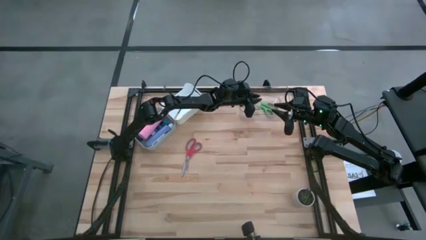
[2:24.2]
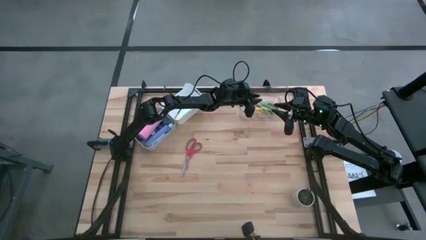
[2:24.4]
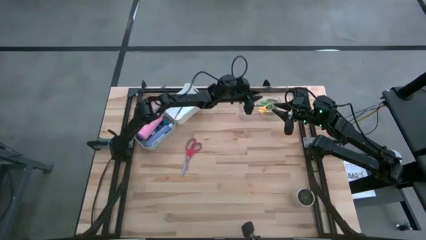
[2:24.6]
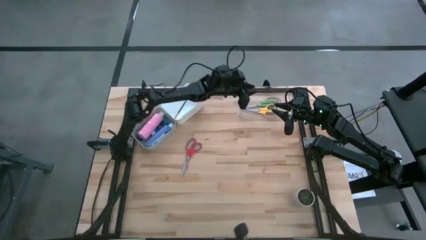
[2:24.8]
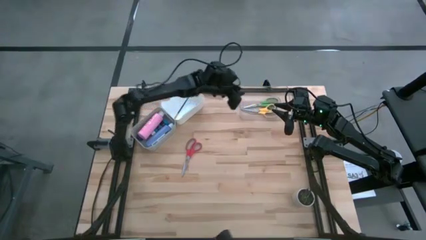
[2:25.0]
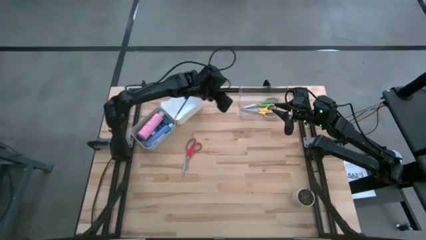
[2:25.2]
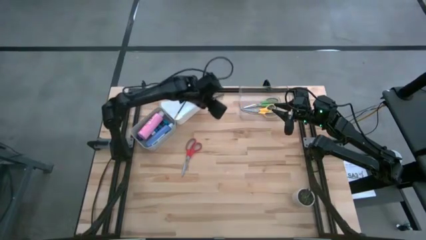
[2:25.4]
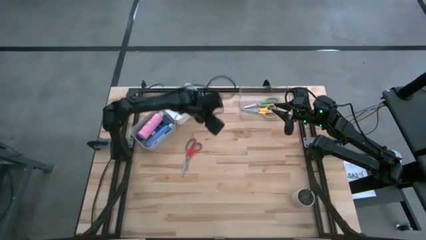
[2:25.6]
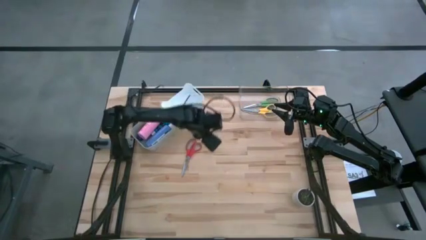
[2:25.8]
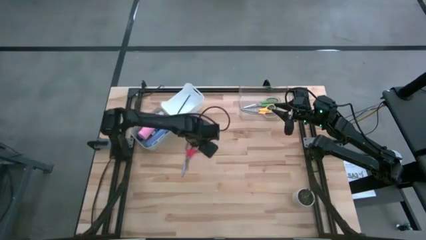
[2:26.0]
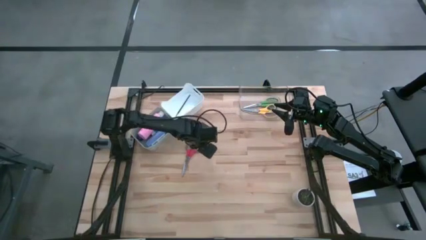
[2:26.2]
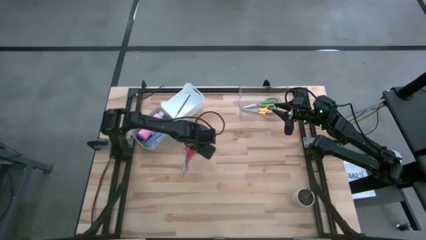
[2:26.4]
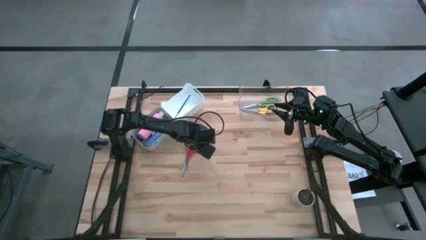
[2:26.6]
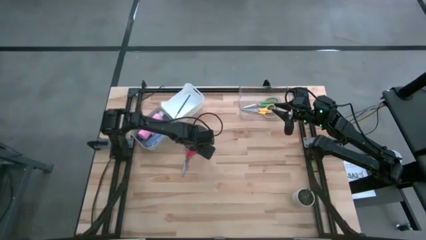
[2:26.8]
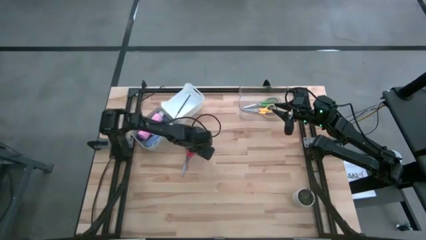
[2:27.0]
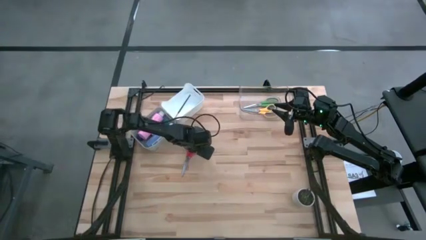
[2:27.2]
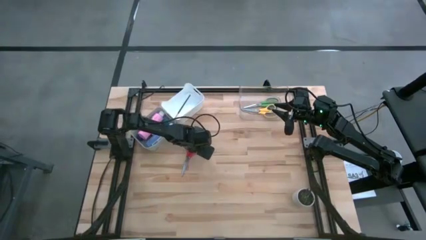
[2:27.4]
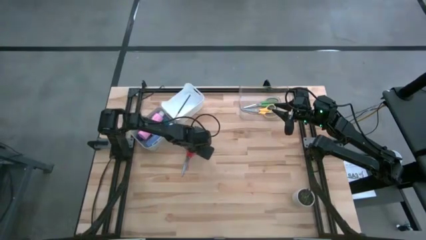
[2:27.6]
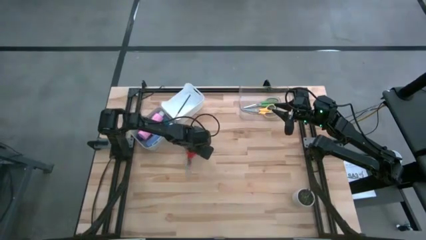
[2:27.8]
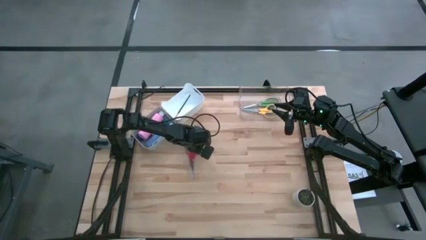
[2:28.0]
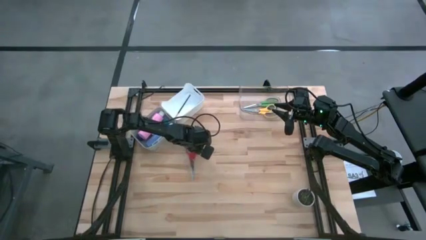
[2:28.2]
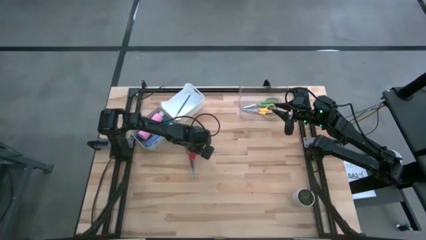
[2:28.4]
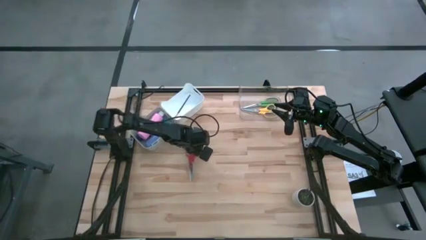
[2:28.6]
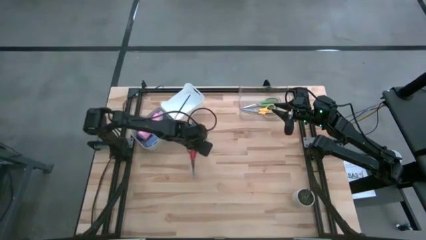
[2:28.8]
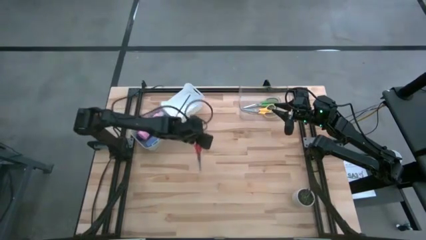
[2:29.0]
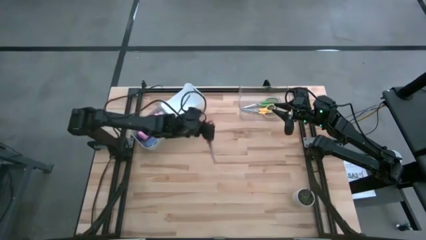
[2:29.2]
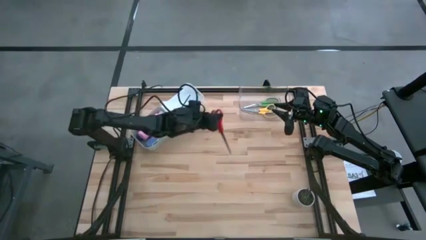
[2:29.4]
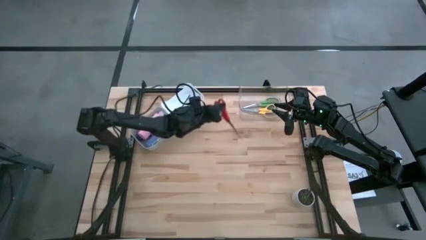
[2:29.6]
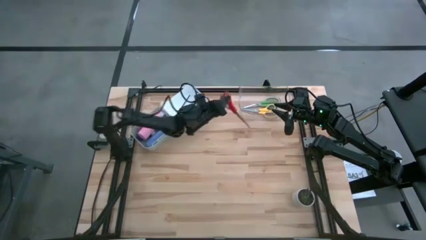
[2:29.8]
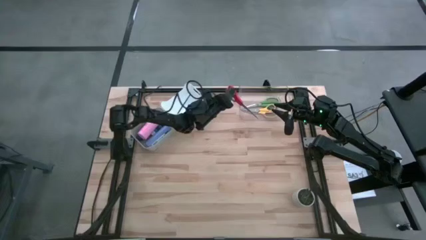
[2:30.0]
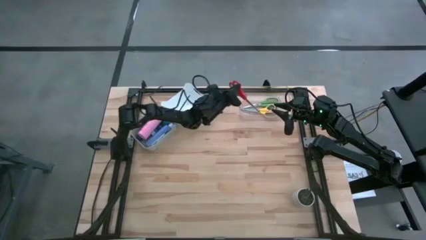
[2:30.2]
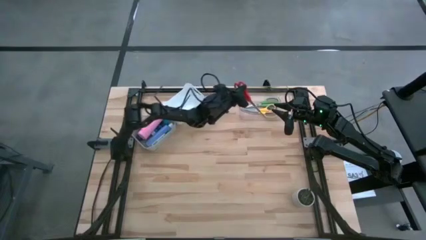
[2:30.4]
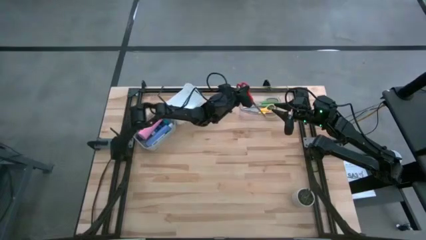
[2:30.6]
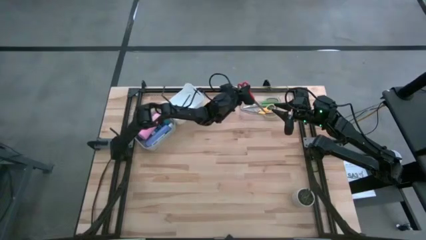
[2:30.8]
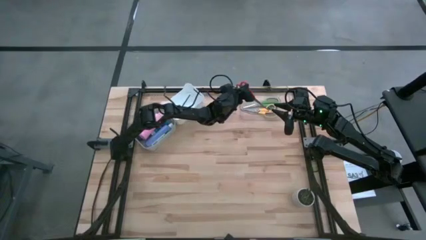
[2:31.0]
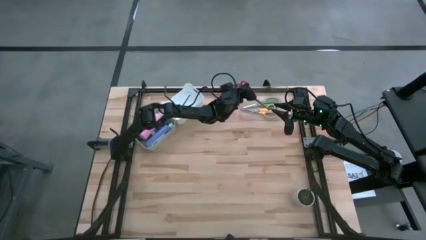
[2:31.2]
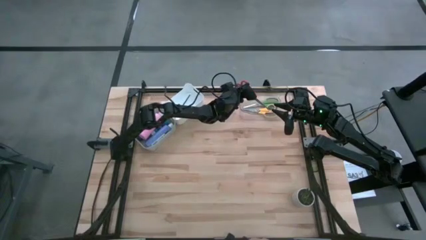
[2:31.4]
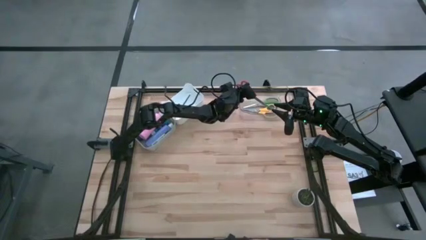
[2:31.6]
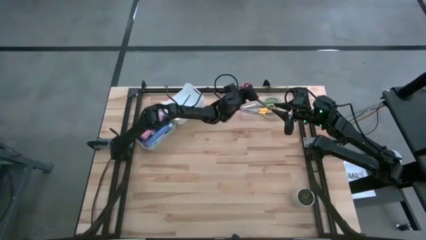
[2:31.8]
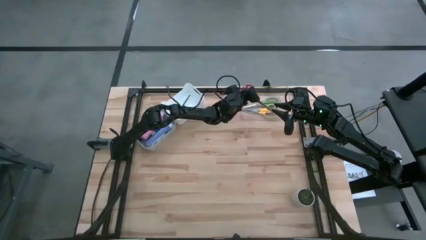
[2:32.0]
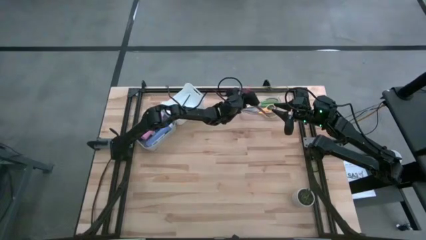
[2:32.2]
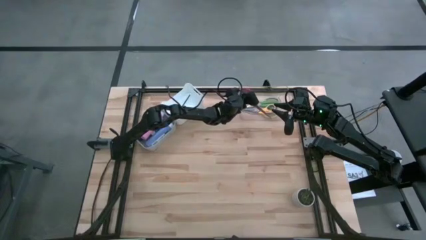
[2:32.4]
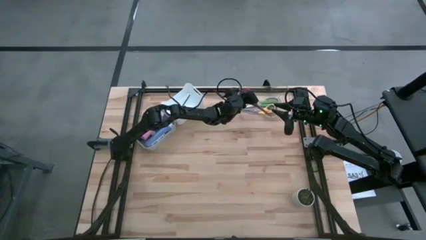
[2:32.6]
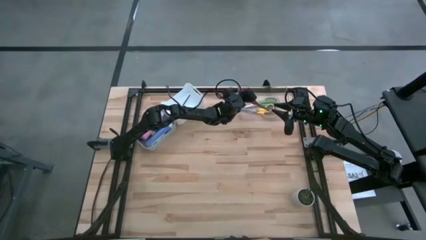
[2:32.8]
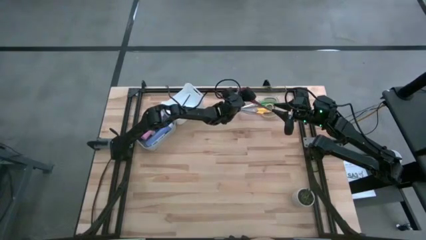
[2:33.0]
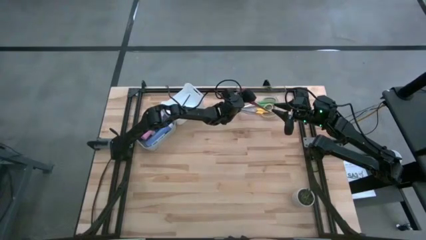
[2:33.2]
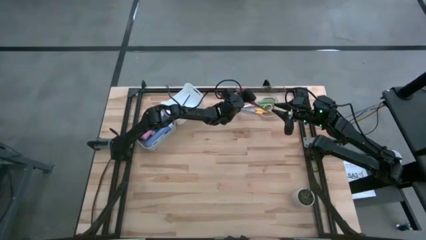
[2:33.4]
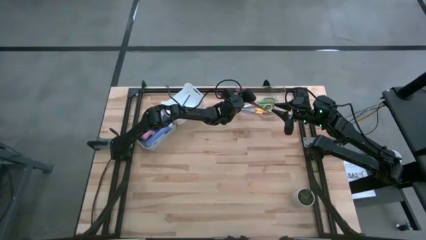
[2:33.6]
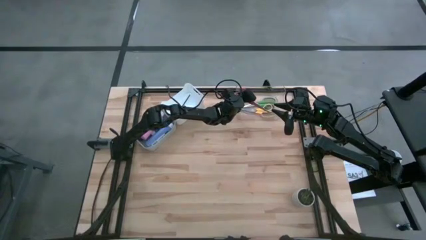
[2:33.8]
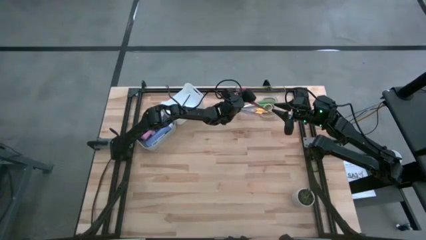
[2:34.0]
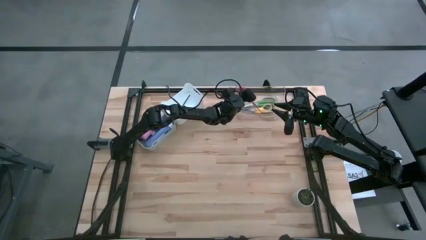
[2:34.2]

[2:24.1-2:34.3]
Task: Pick & Place Paint Supplies
Put the red scissors into the transparent bin

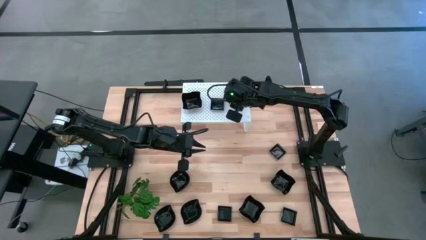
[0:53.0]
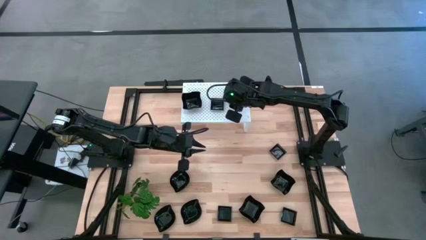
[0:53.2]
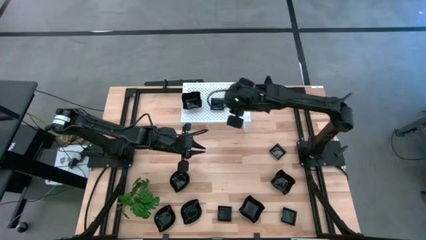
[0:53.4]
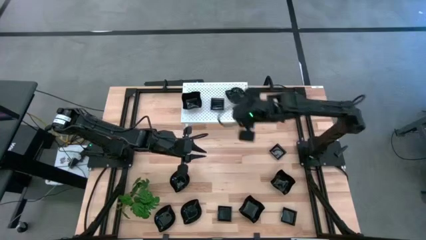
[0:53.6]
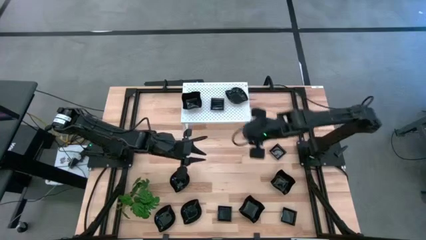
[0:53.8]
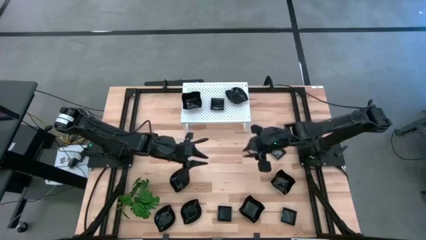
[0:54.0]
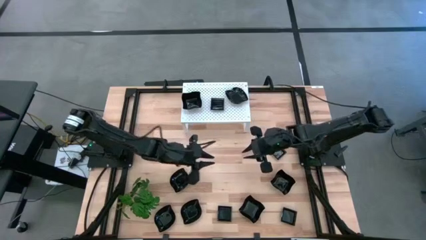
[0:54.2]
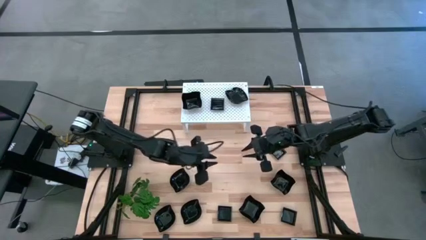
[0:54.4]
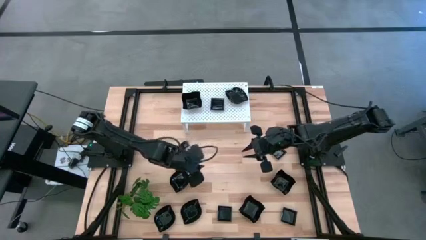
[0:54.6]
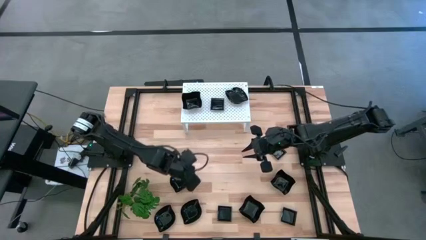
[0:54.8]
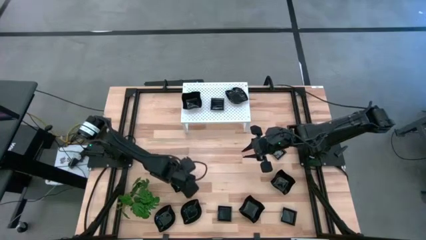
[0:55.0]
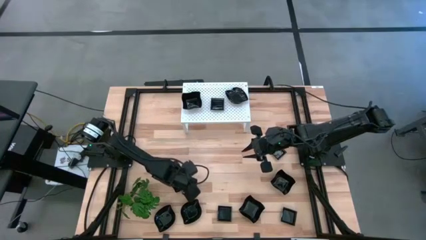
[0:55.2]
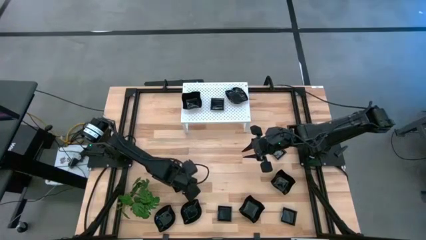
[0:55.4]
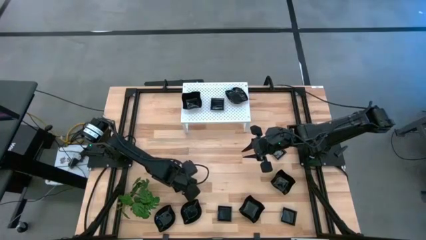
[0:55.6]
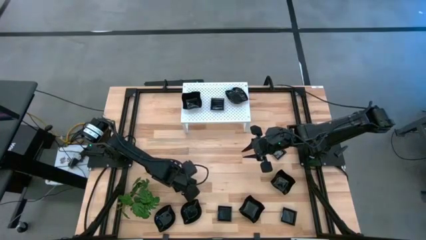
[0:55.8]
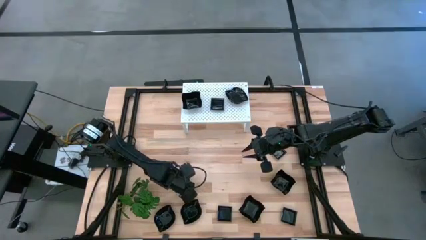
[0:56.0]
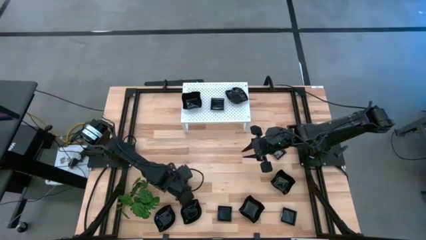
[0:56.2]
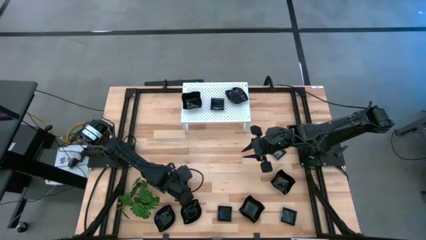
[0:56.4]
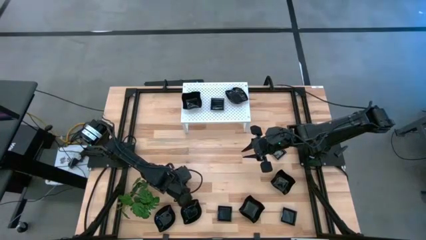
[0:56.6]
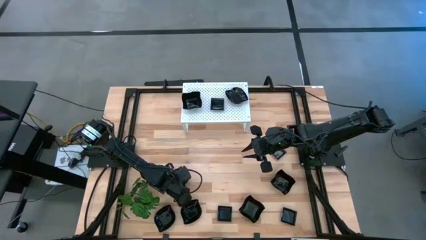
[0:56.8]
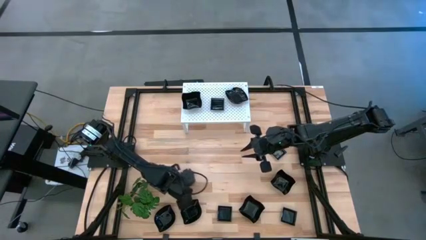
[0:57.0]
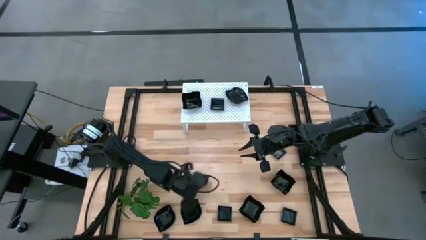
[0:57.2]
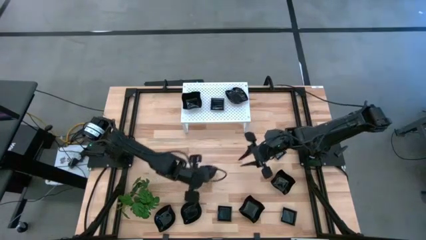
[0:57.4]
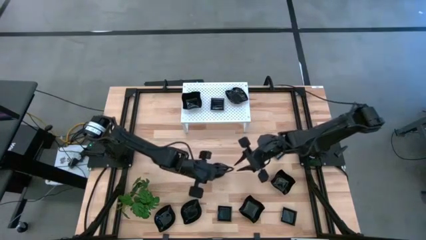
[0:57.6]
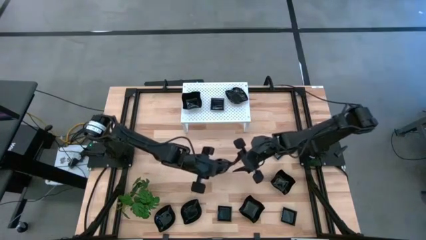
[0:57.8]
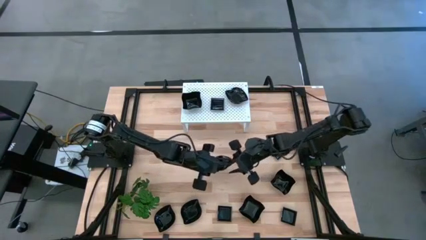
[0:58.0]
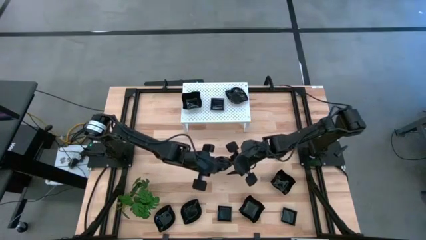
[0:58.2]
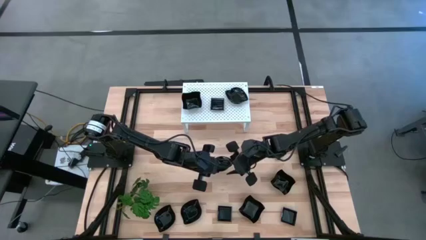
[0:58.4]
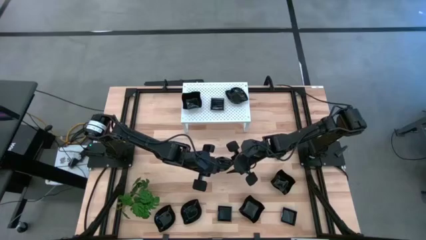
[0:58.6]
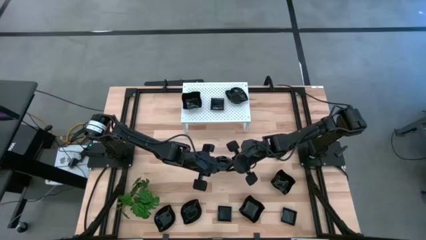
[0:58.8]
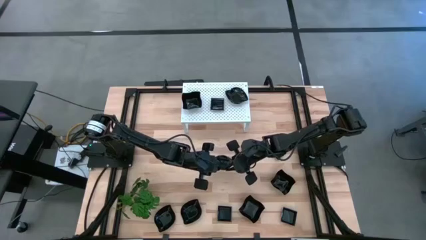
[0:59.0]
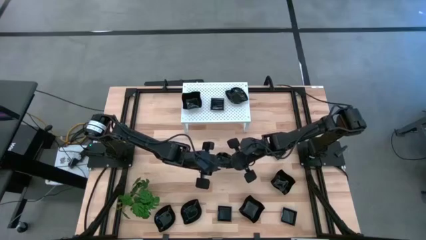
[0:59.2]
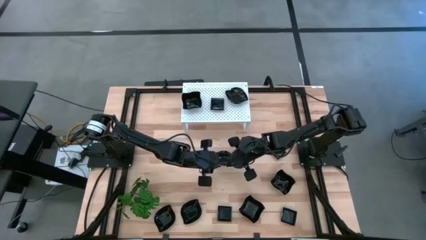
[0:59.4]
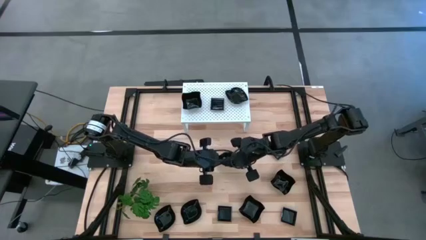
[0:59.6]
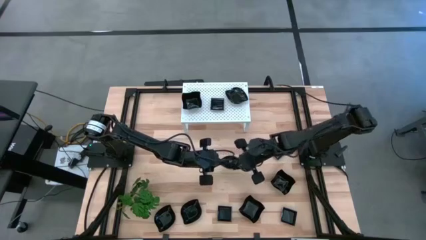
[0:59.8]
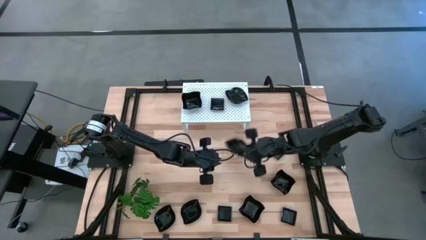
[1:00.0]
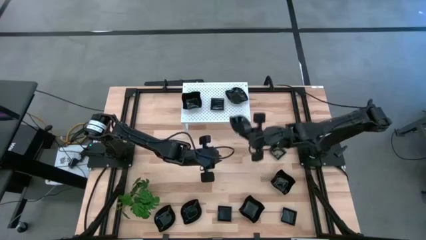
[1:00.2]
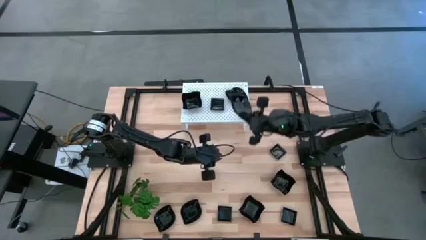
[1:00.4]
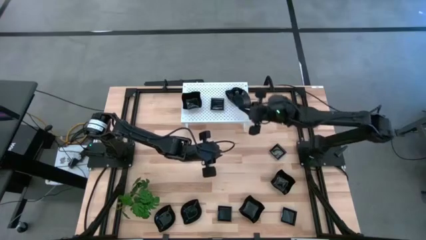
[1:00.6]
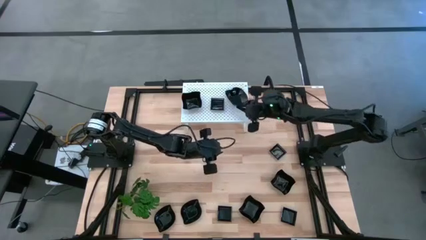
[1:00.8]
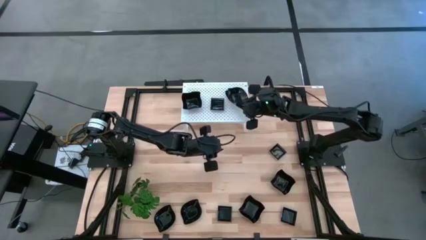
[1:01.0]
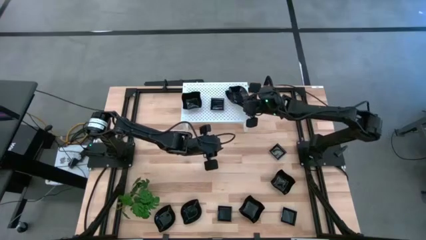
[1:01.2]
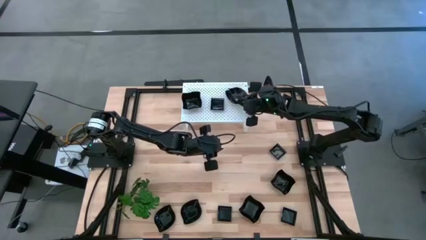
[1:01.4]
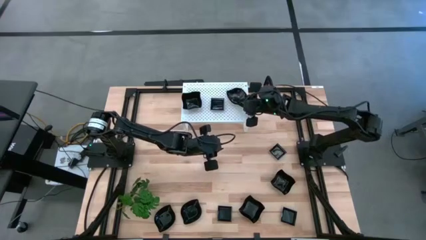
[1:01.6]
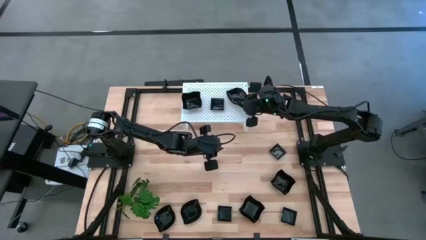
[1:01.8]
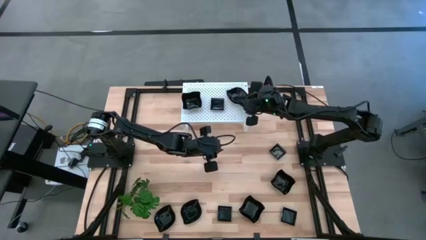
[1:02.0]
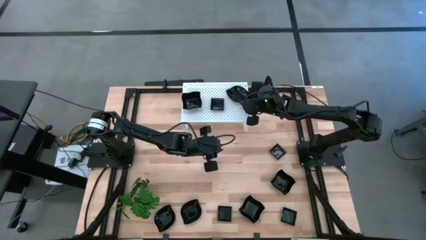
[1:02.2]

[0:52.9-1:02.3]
Task: Pick & Place Mini shaped plates
Stack the leaf shaped plate on top of the other leaf shaped plates on the shelf
